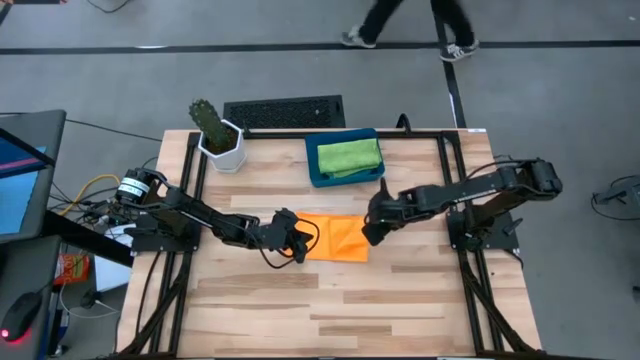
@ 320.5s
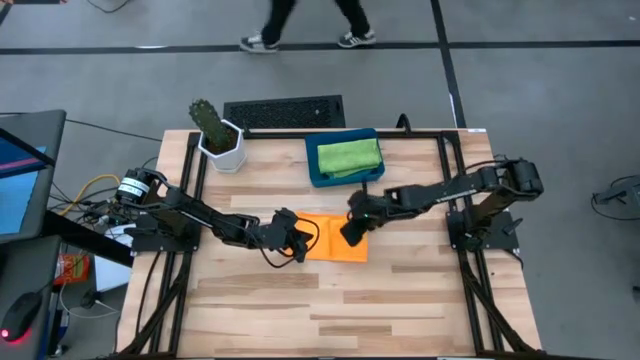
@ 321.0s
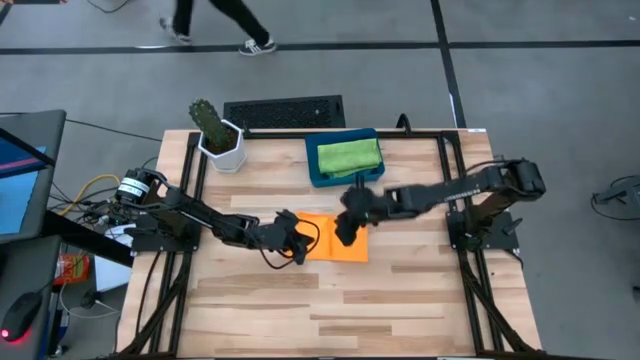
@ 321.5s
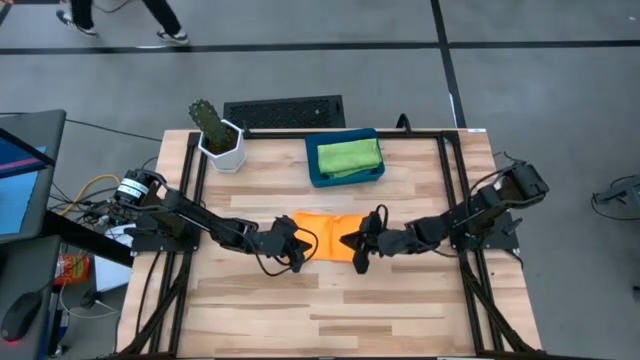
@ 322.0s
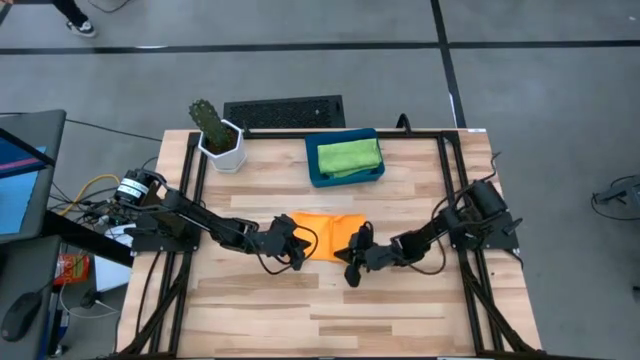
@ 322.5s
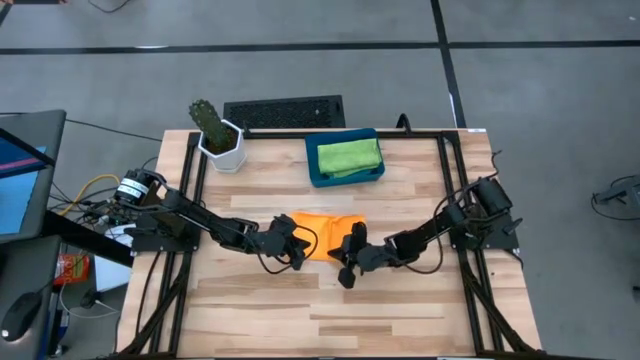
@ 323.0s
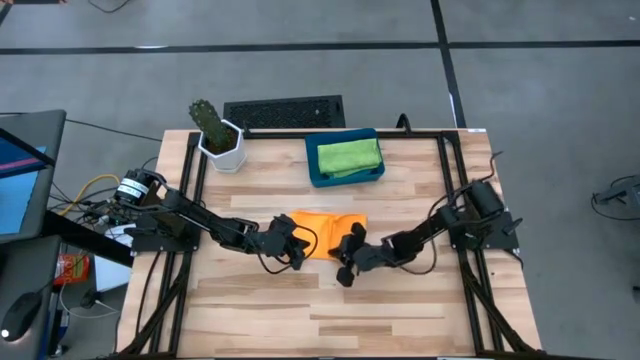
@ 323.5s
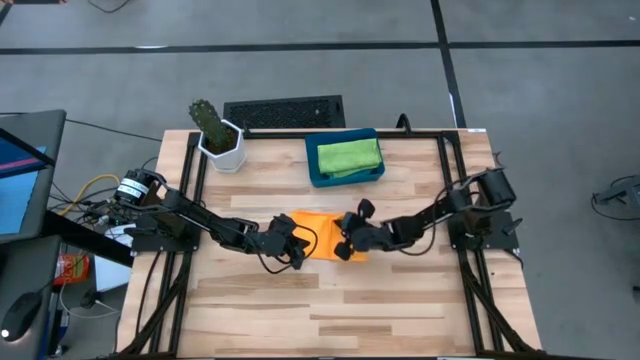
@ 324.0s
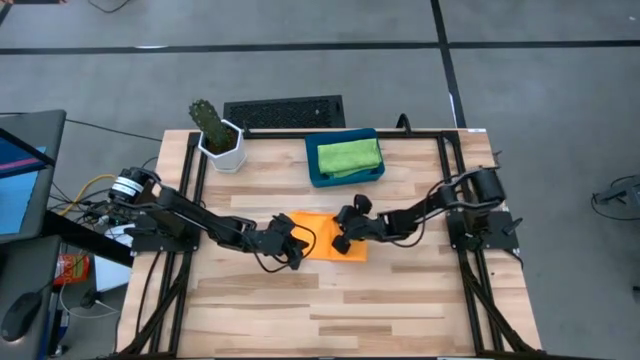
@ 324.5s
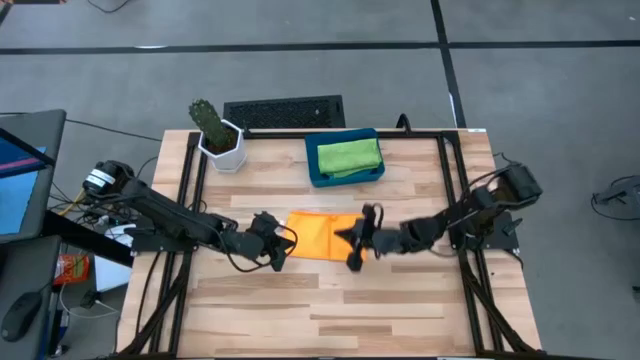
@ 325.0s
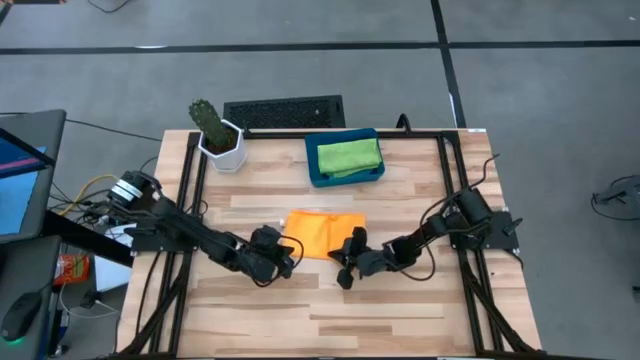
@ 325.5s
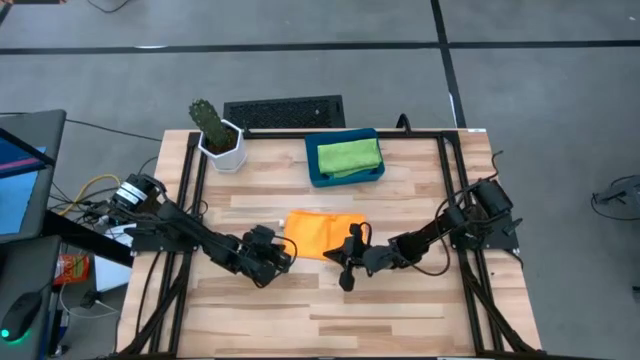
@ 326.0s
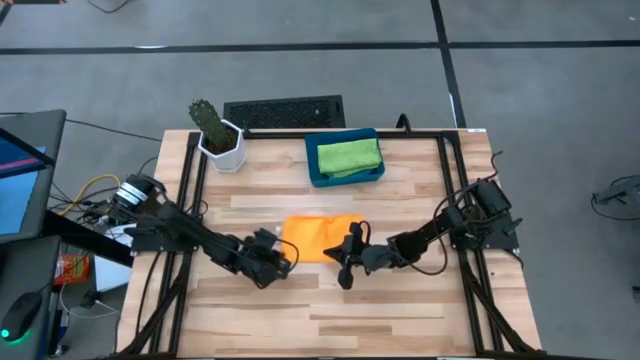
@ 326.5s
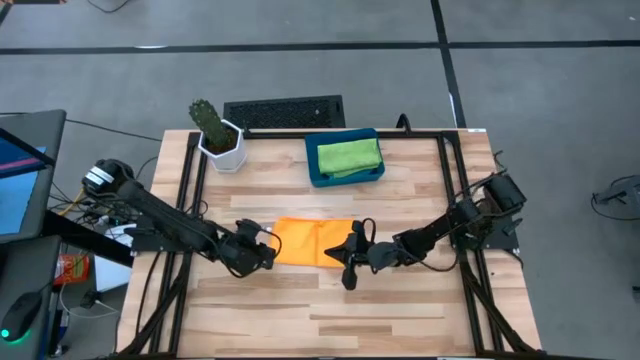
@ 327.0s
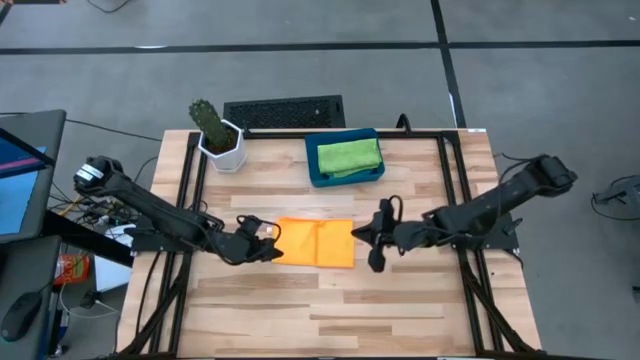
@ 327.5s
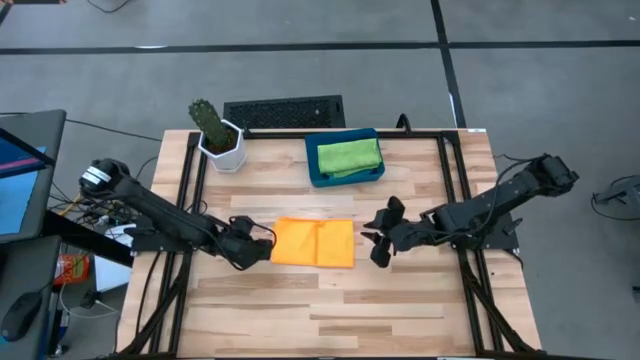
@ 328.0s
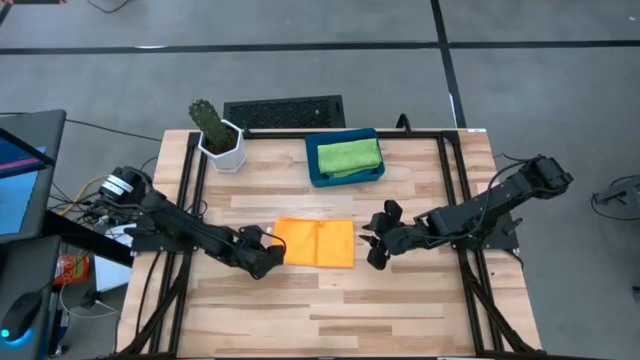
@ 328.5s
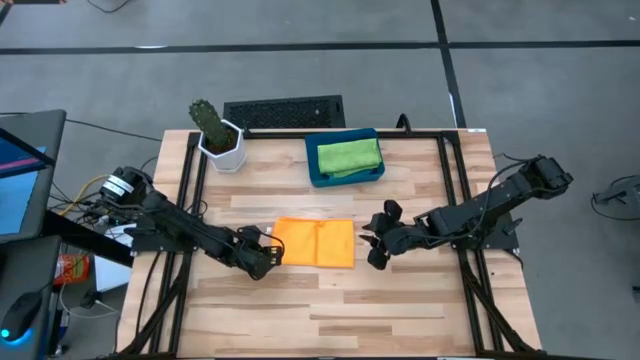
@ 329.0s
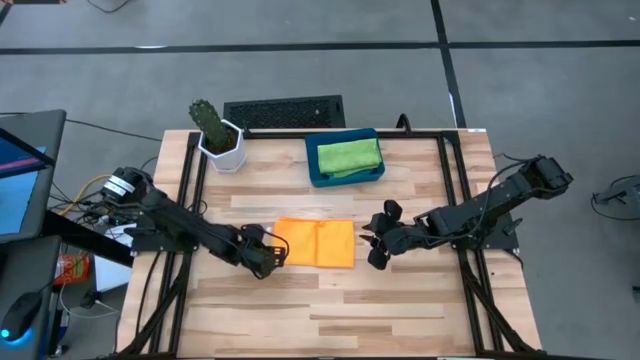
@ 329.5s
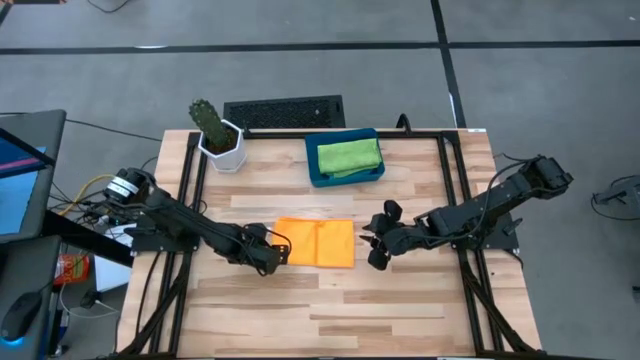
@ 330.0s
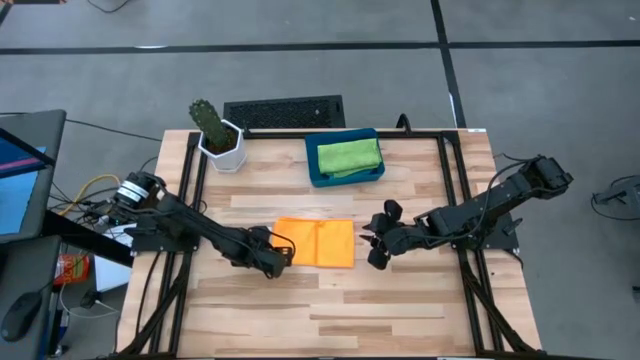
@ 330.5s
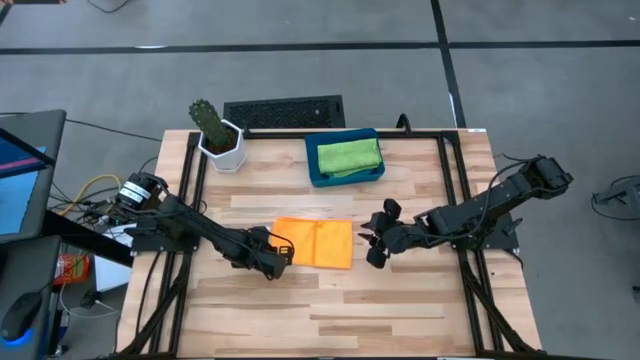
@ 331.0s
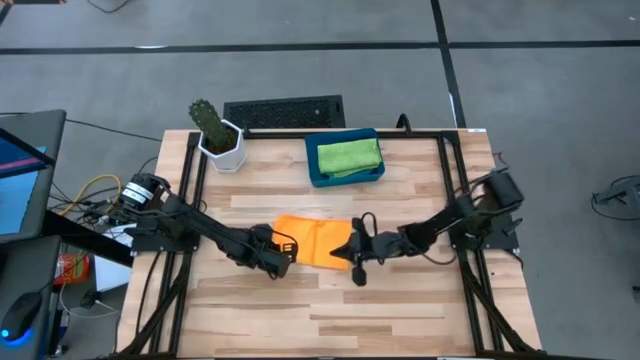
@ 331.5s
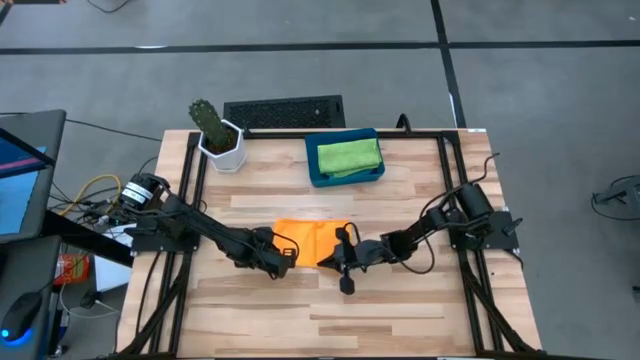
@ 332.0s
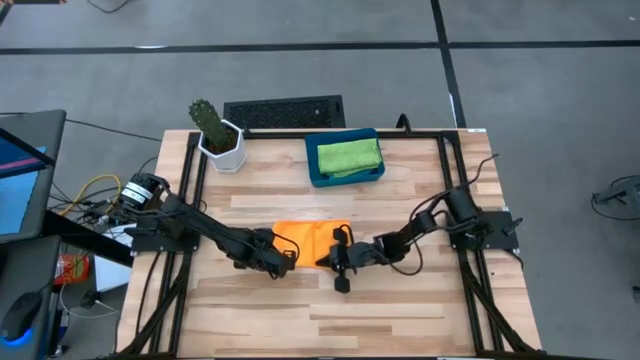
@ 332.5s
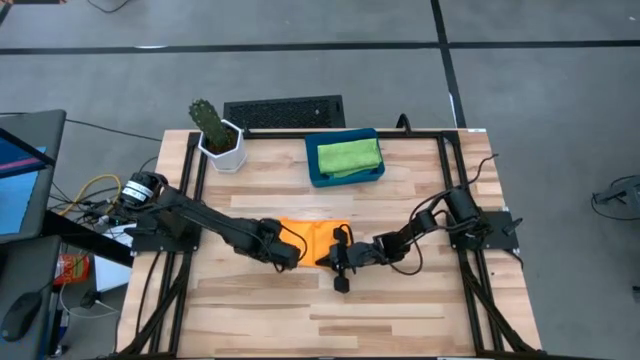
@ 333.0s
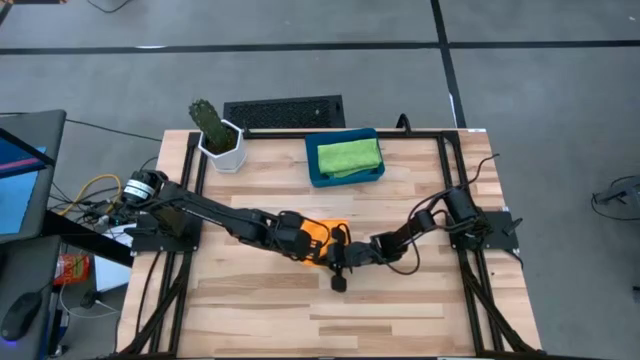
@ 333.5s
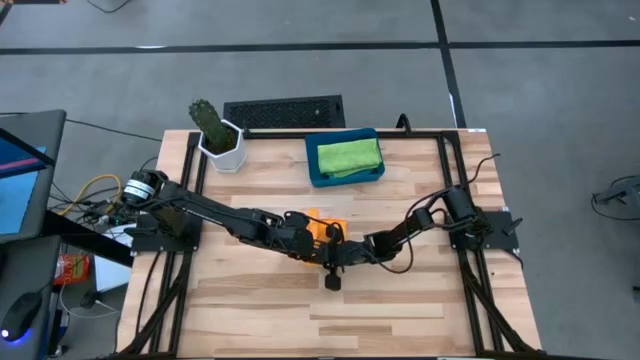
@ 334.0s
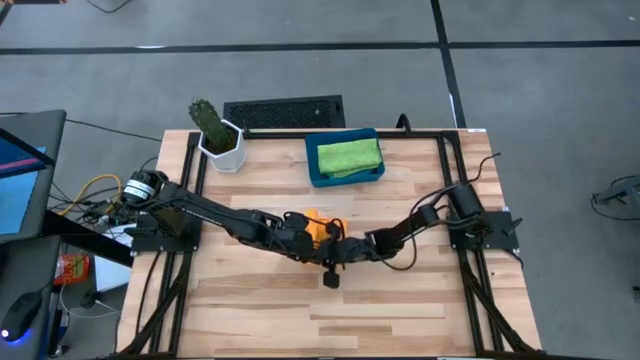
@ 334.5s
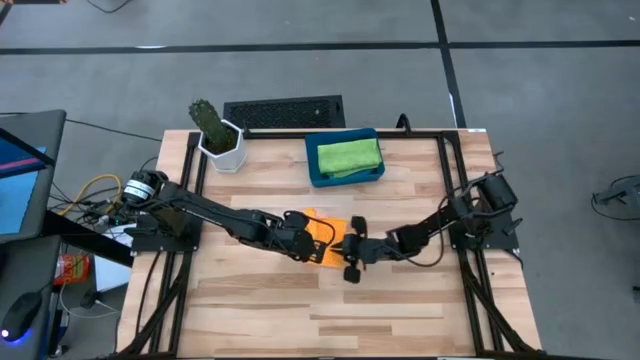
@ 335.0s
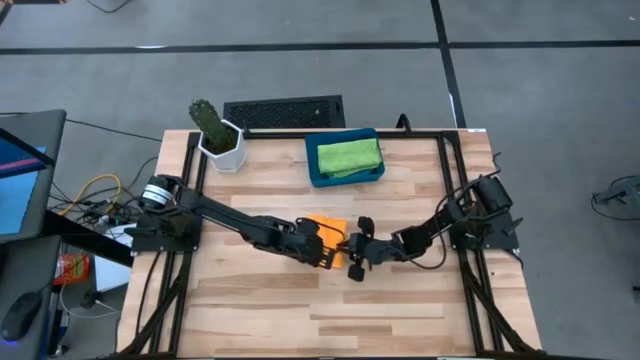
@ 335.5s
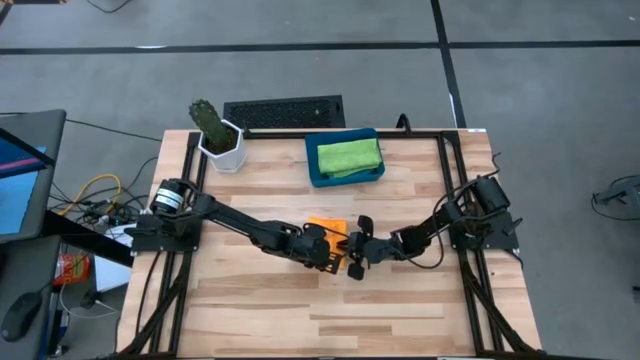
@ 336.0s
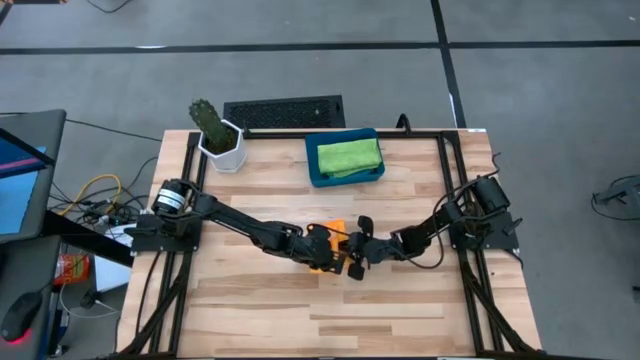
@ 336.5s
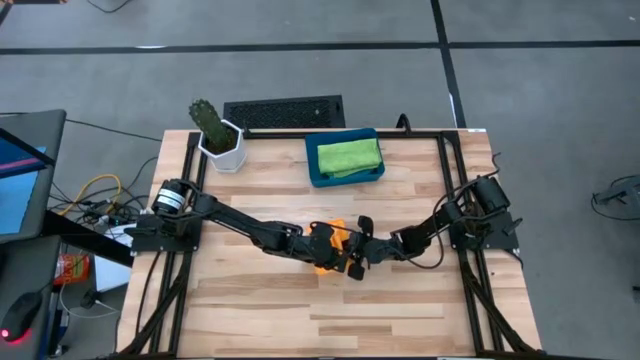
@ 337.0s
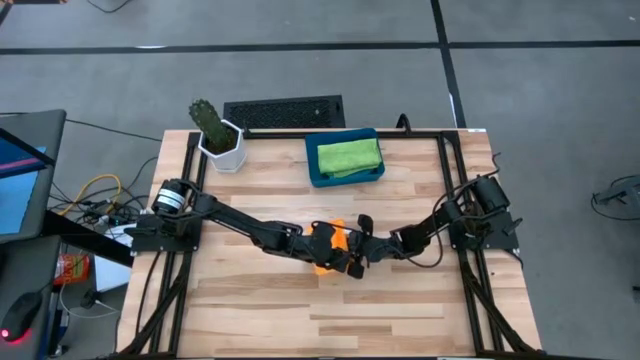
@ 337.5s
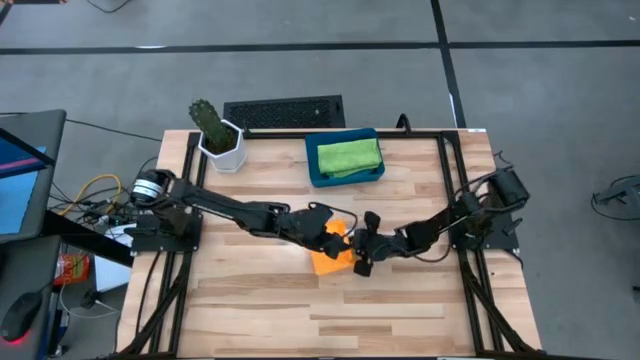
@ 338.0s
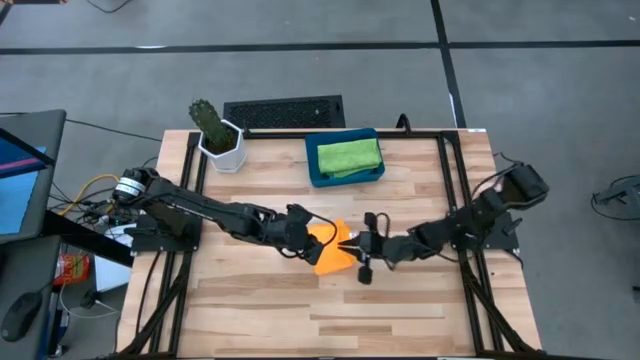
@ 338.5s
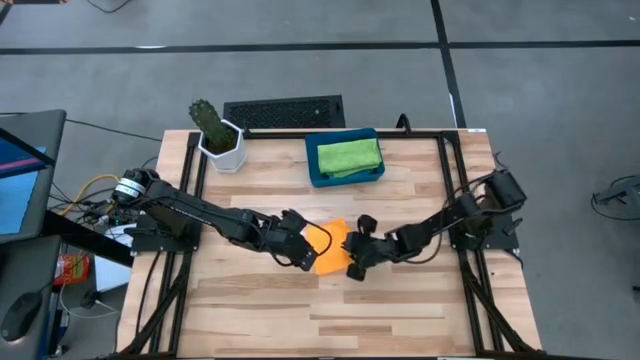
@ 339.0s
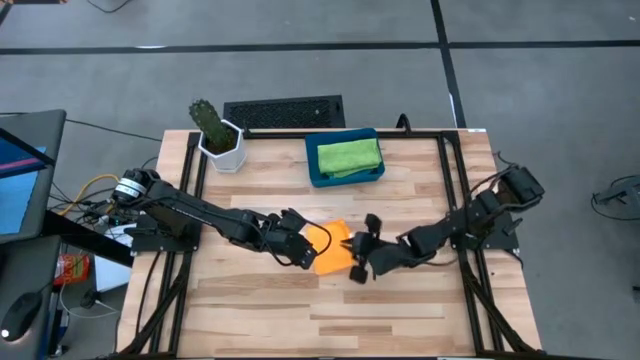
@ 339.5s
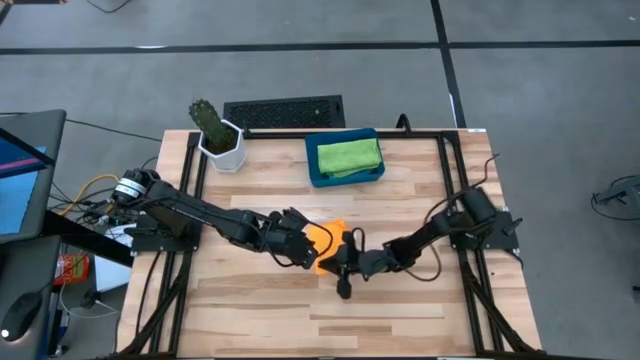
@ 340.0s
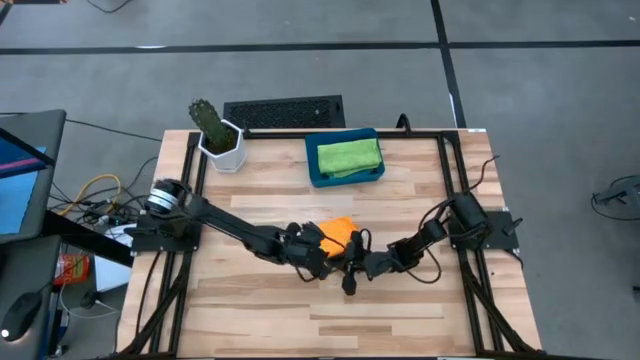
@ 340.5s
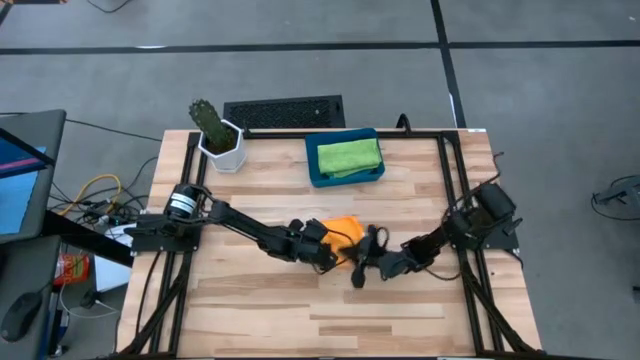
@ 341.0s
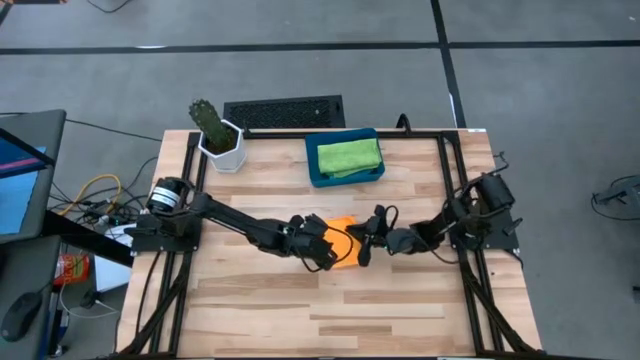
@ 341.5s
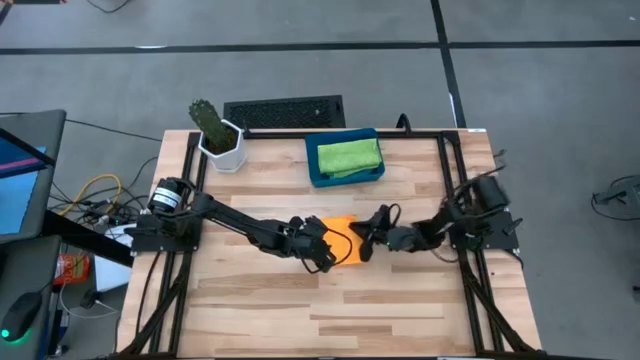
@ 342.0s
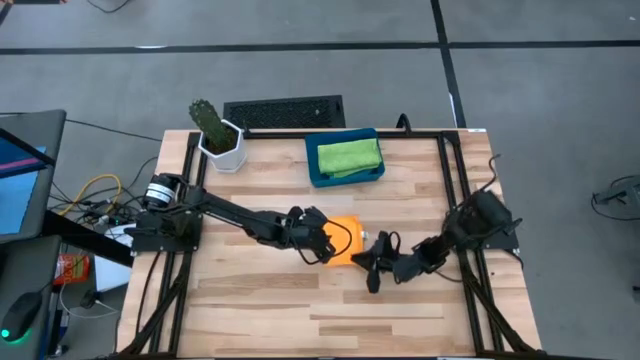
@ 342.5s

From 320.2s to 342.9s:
Task: Fold microfiber towels
Fold the orange microfiber cloth
